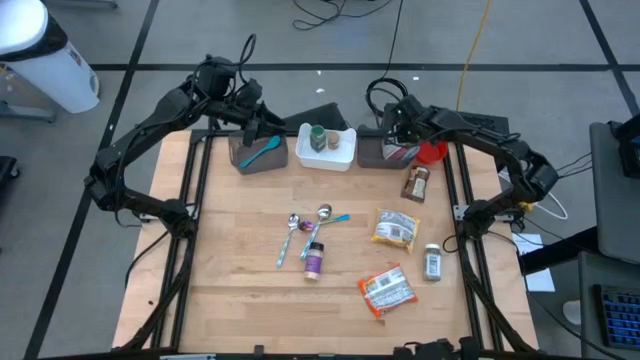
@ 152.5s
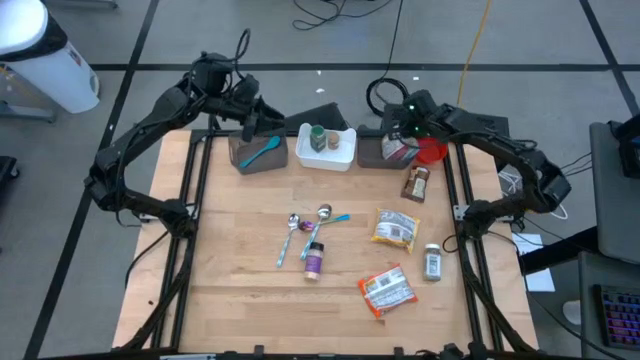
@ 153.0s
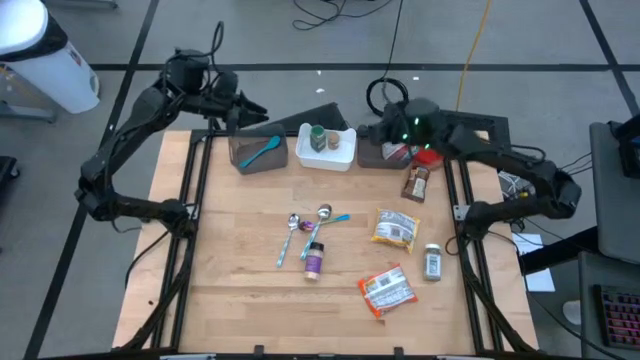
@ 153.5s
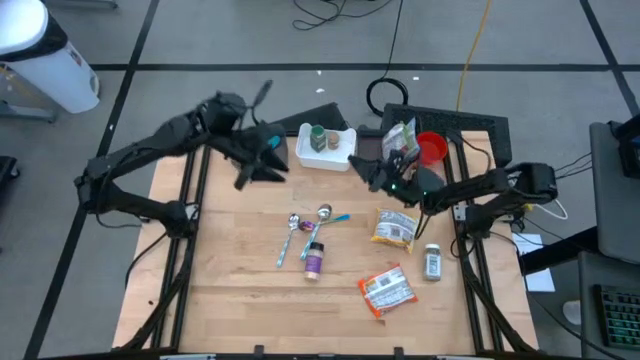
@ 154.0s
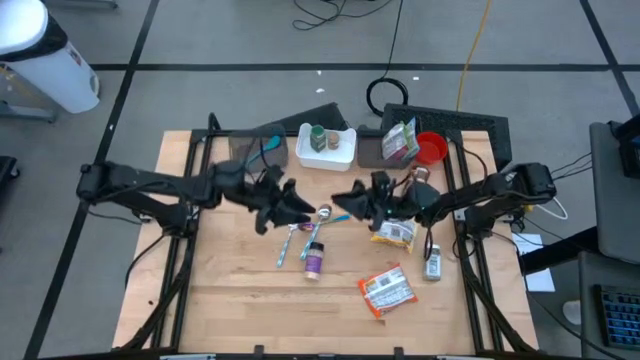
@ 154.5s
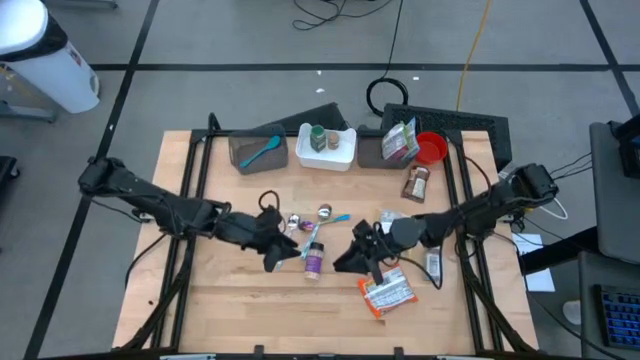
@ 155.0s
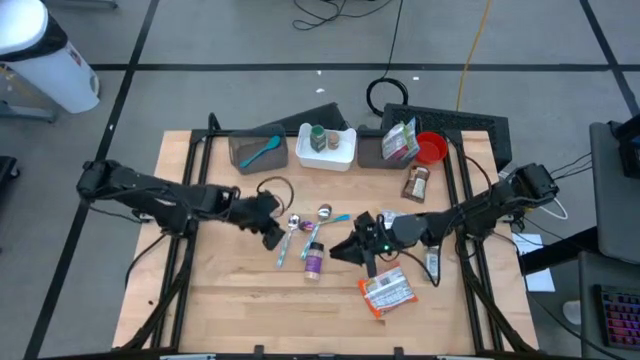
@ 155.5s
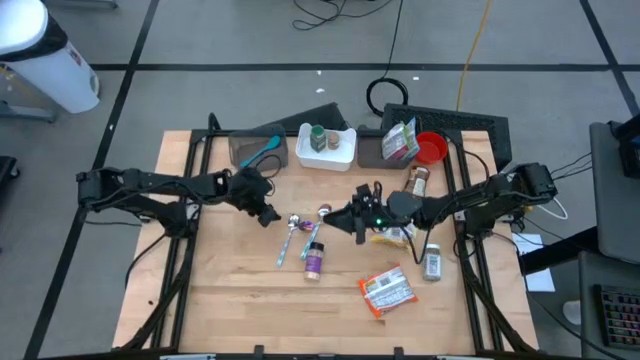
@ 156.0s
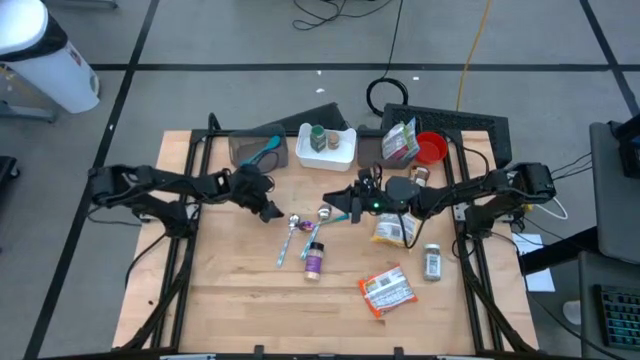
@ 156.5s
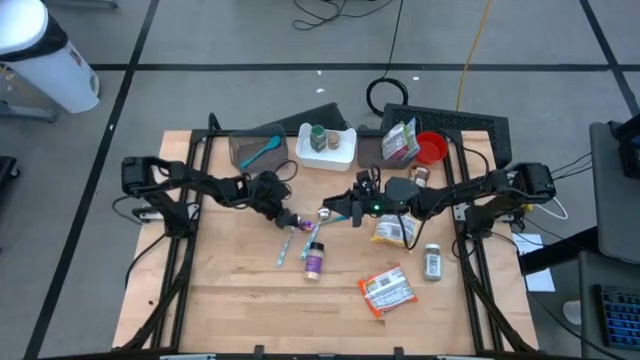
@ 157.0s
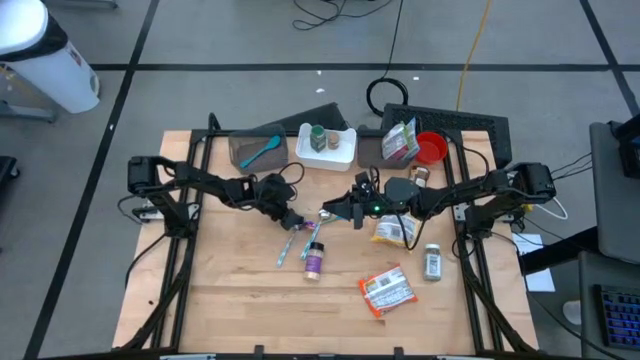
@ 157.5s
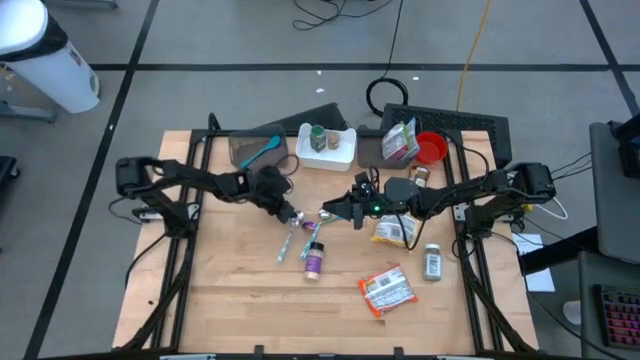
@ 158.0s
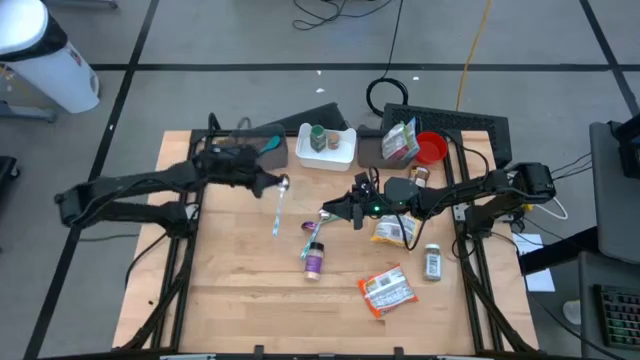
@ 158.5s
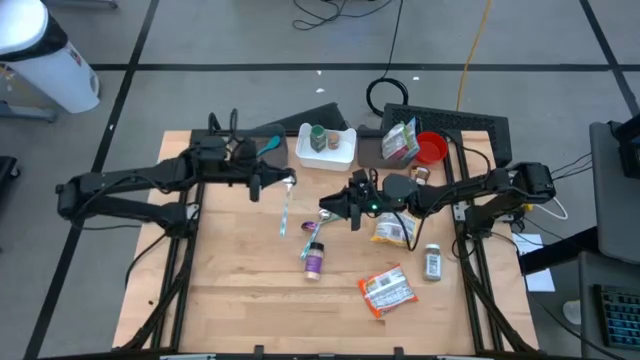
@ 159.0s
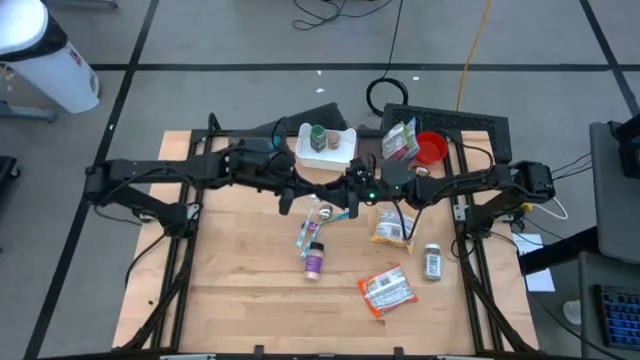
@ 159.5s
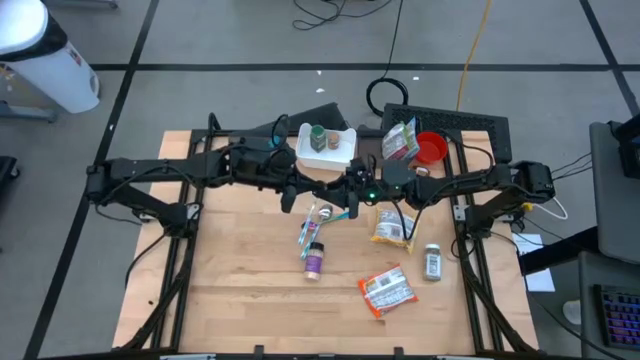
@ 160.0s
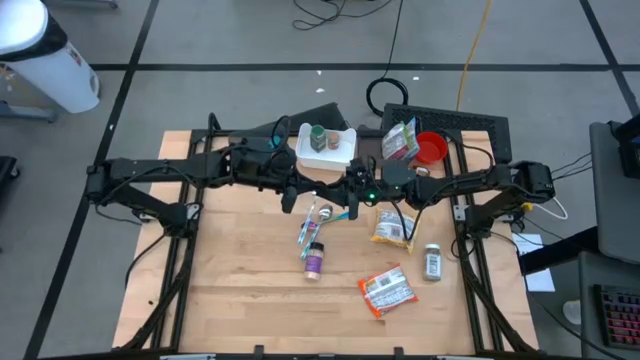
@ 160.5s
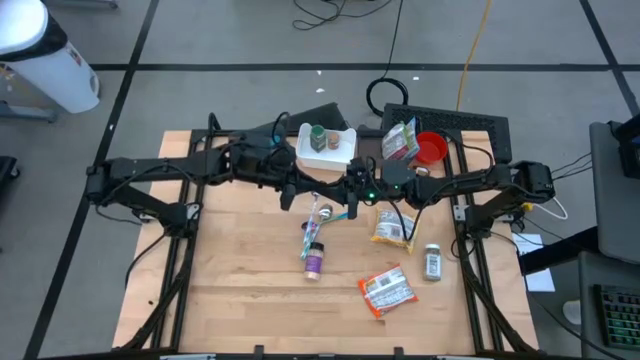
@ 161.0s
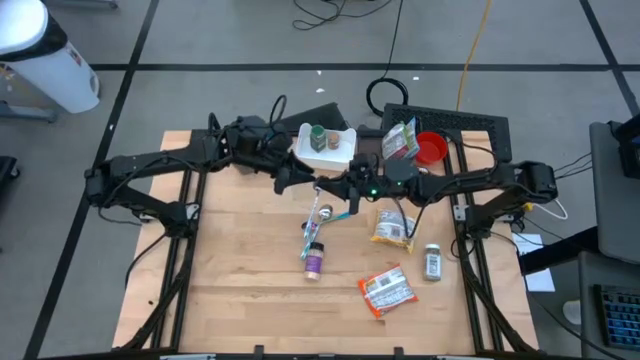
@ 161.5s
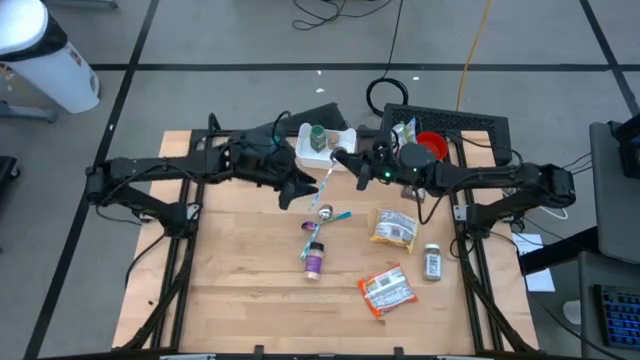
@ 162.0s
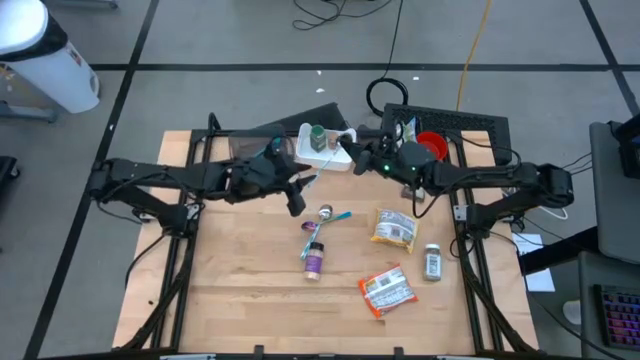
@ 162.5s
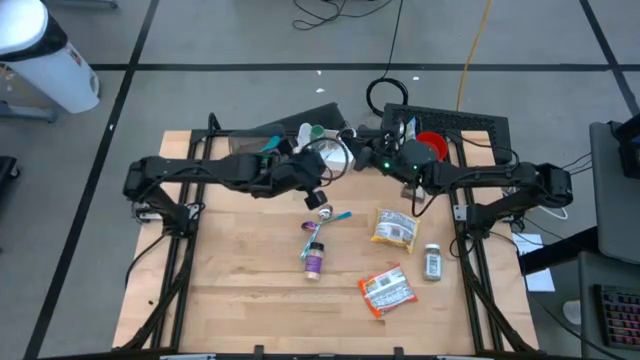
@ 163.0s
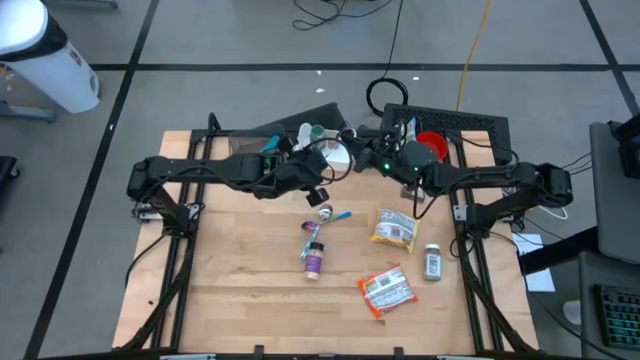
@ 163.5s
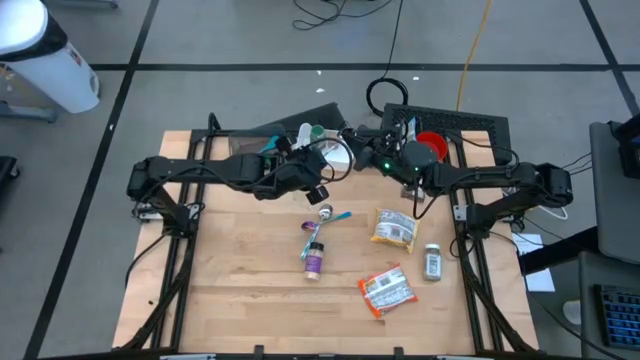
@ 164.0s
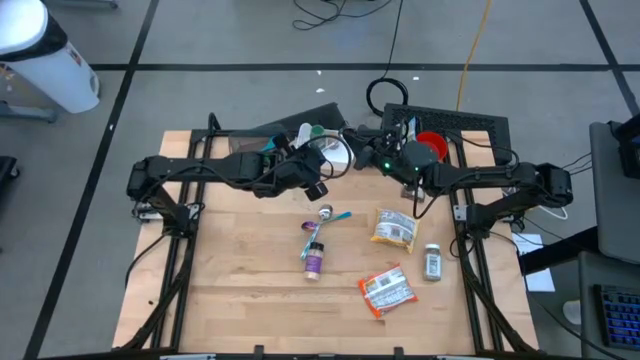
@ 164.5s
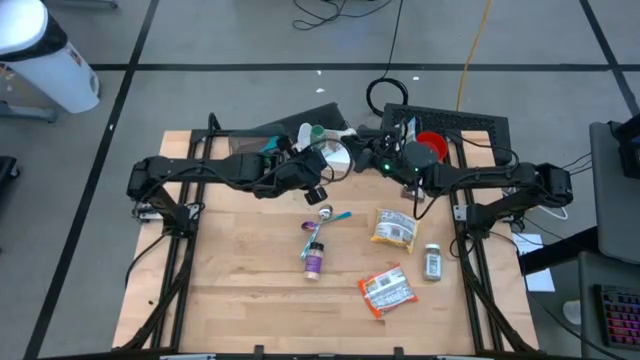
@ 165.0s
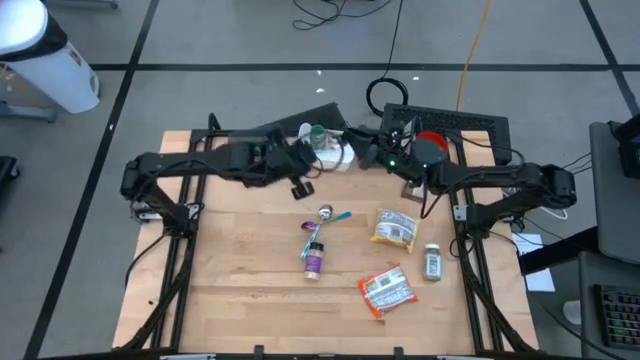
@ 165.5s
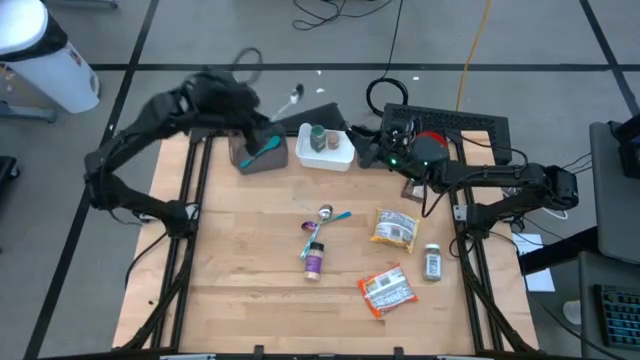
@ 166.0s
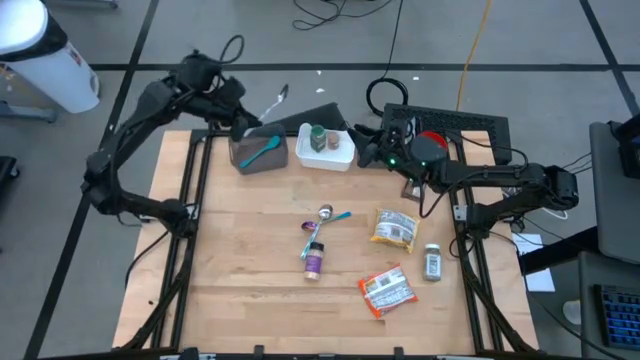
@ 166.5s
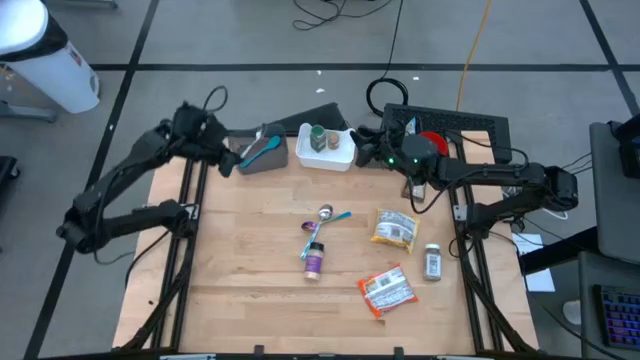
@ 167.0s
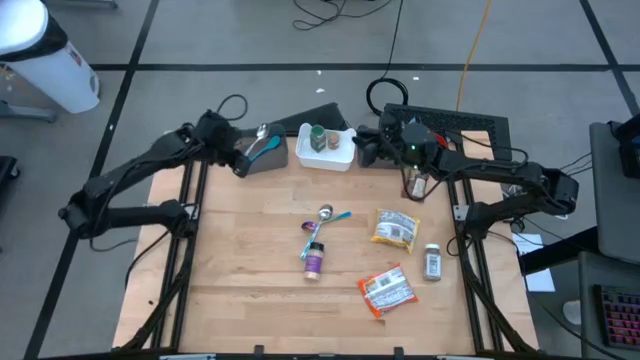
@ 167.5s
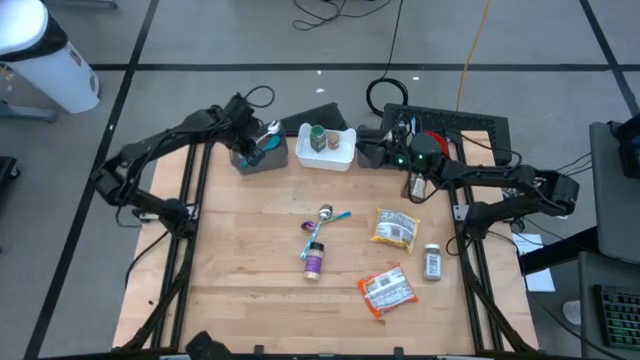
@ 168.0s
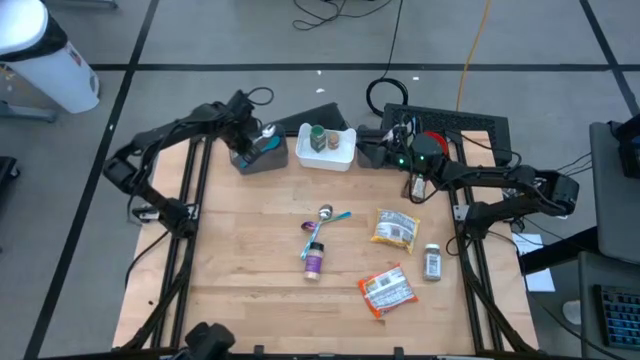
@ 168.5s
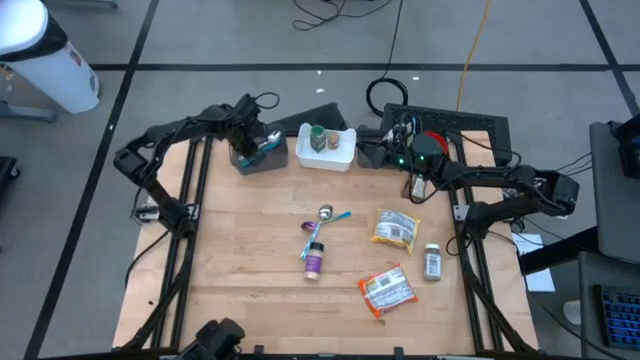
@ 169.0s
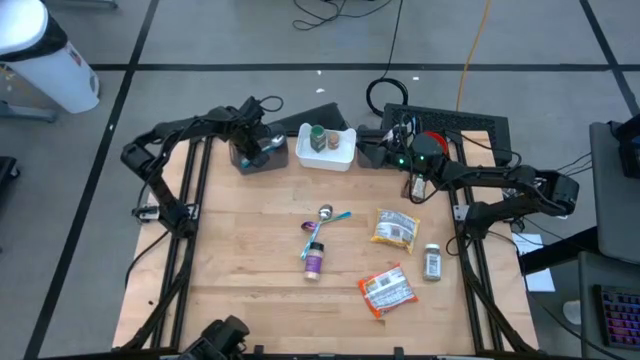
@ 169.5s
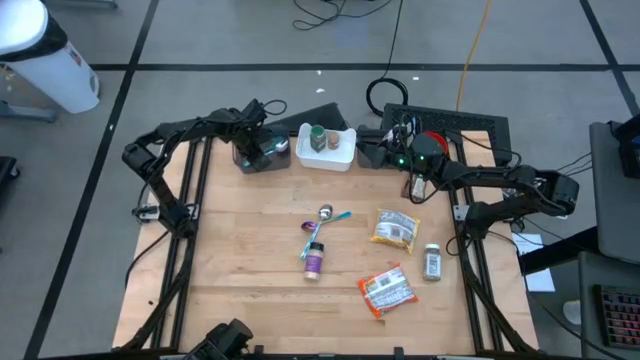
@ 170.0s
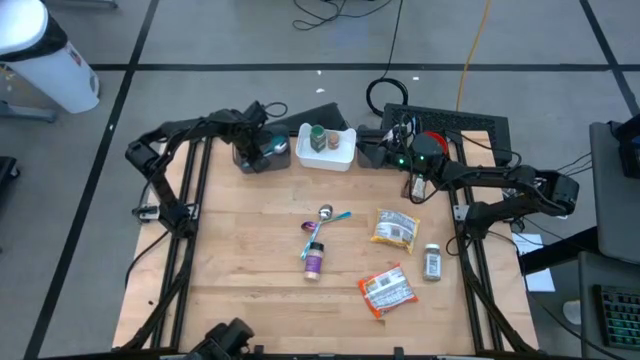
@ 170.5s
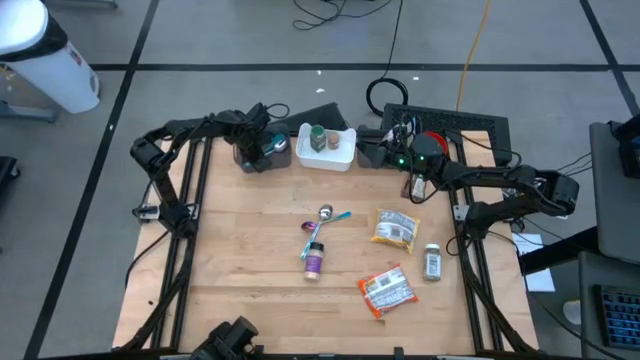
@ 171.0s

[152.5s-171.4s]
Task: Pick & Place Food Item
Put the left blue patterned spoon into the left black bin

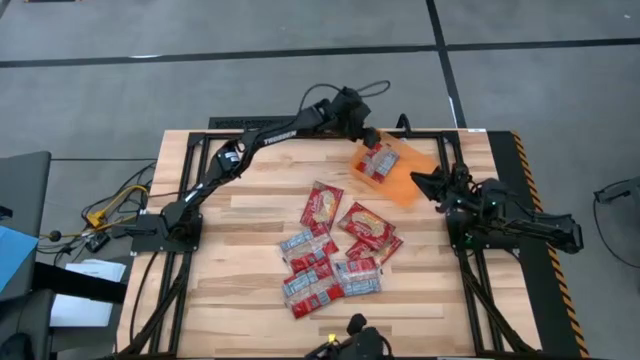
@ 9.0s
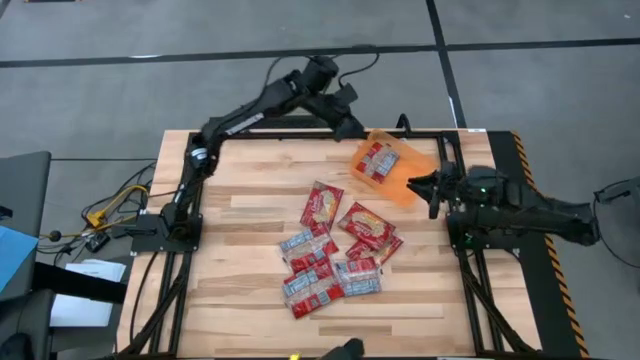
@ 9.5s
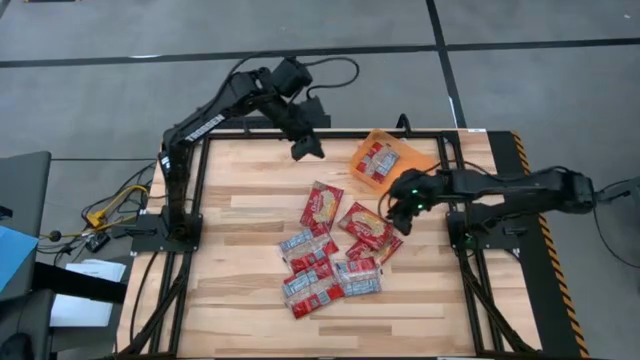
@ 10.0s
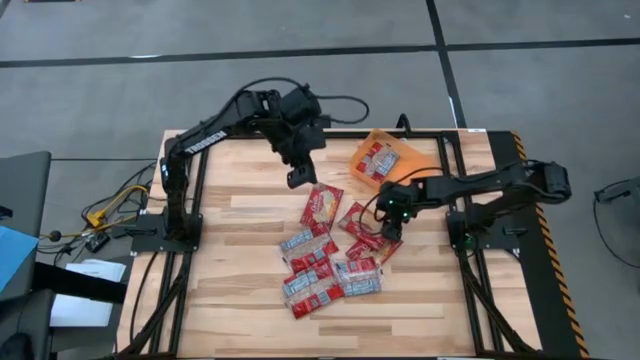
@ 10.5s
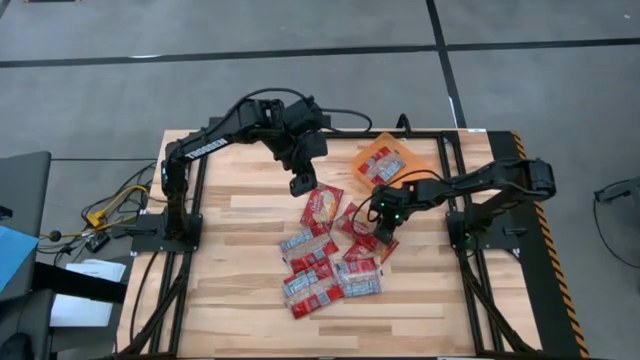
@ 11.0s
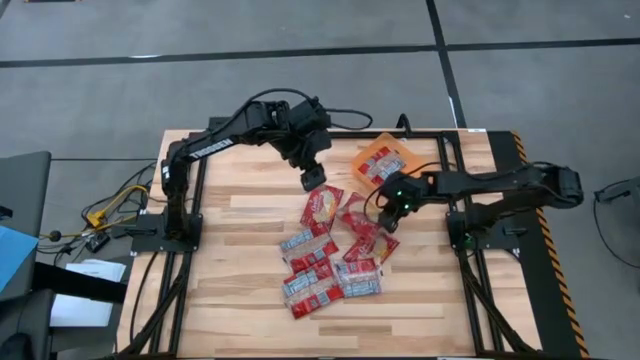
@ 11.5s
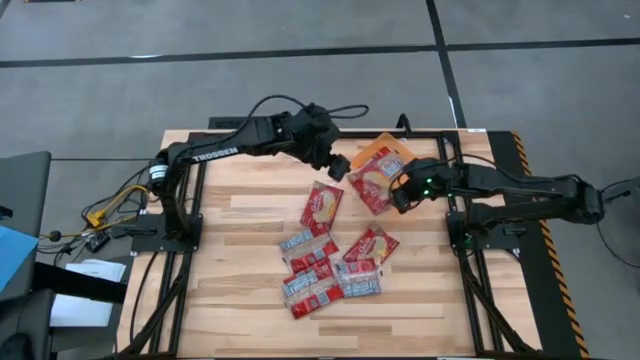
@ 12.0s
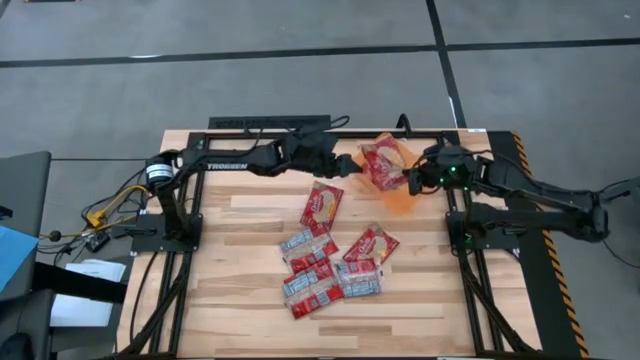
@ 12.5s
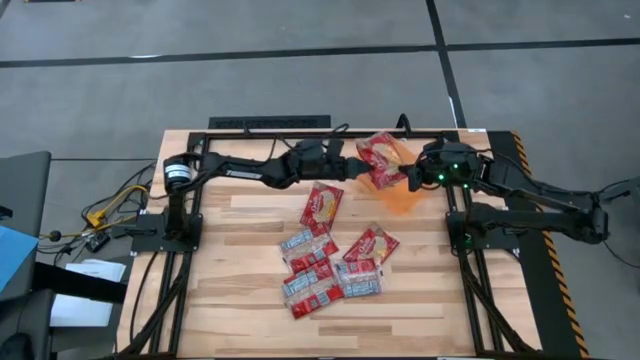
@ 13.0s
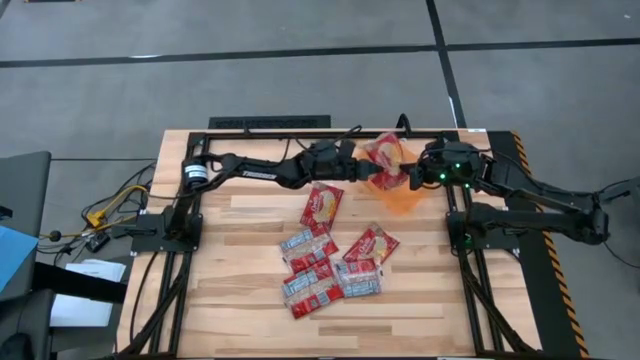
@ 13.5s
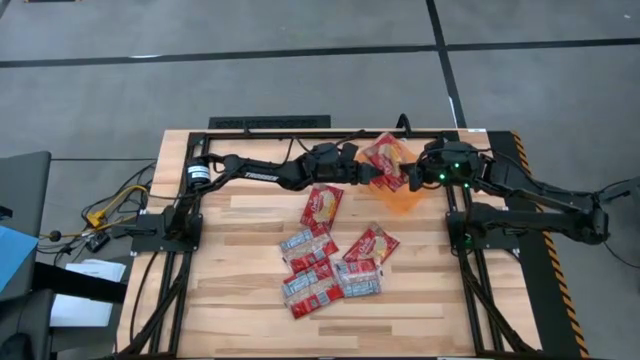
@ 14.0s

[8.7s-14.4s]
Task: Sort popcorn bags into baskets
Put the popcorn bag into the orange transparent bin
